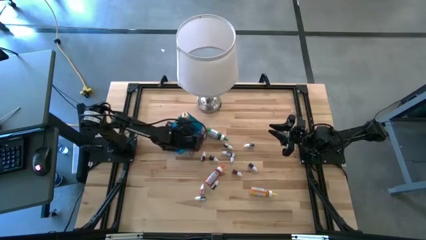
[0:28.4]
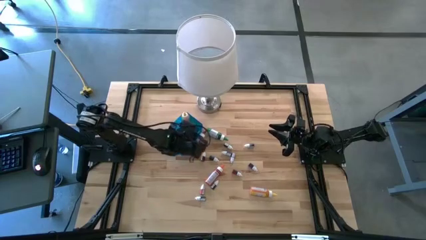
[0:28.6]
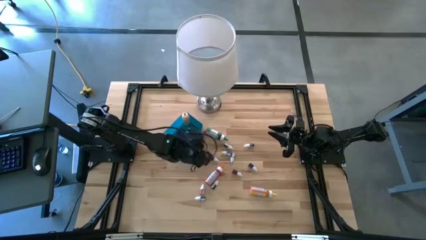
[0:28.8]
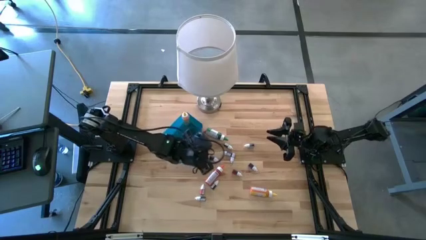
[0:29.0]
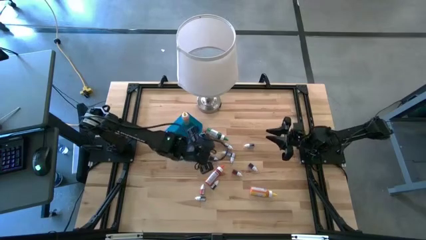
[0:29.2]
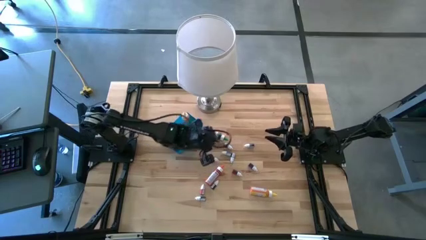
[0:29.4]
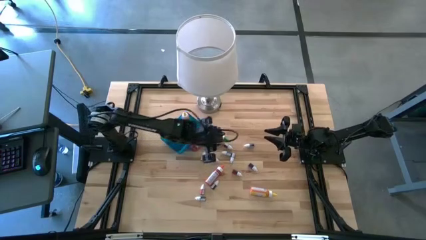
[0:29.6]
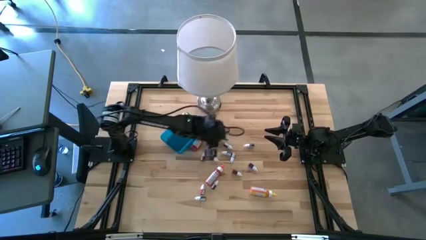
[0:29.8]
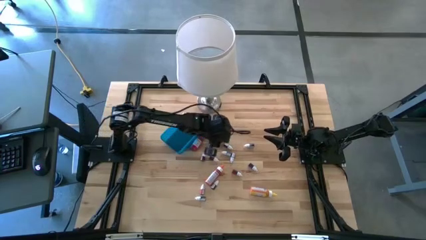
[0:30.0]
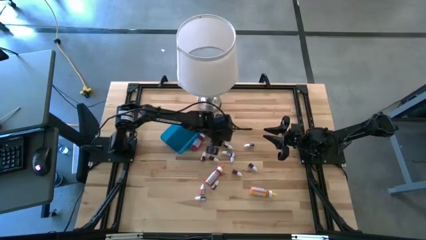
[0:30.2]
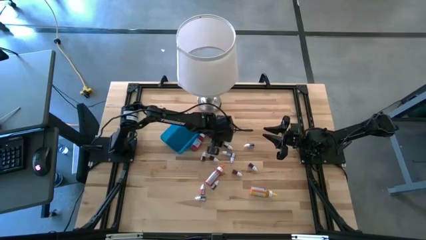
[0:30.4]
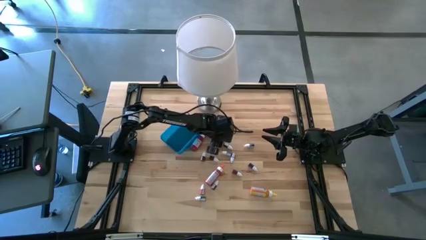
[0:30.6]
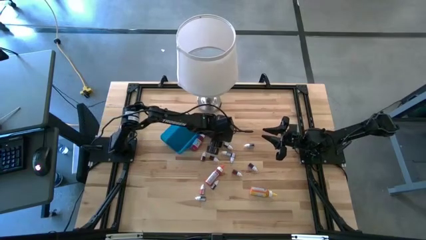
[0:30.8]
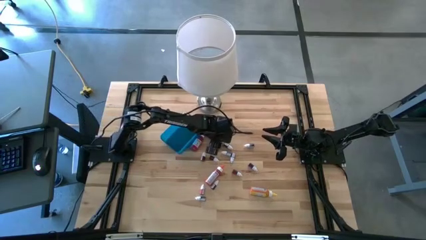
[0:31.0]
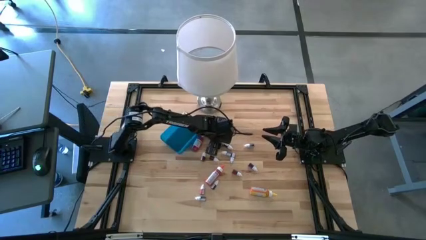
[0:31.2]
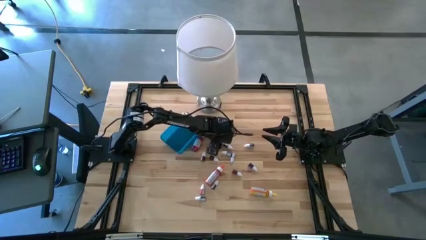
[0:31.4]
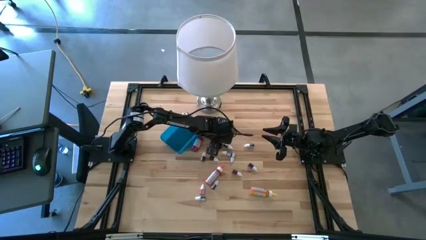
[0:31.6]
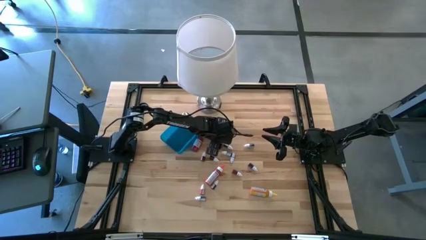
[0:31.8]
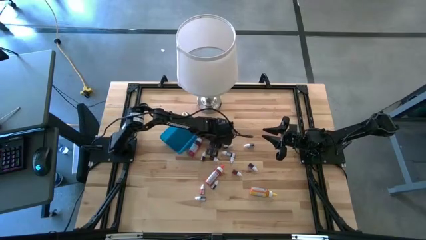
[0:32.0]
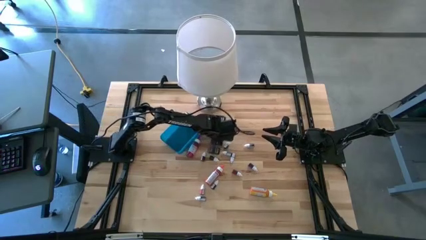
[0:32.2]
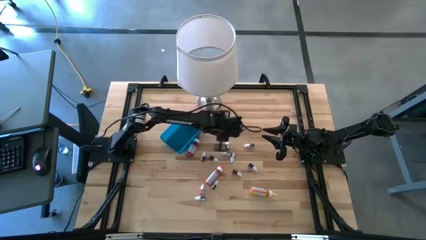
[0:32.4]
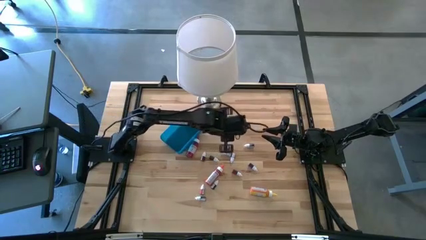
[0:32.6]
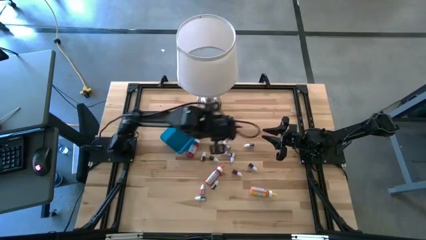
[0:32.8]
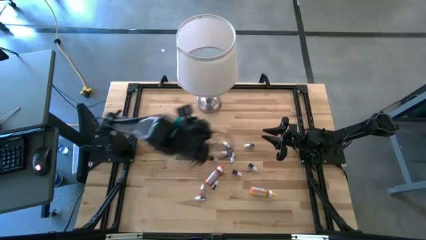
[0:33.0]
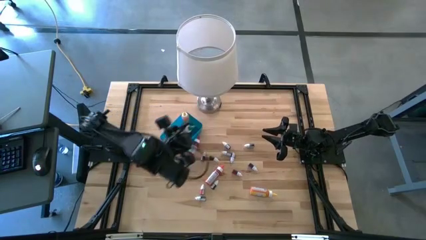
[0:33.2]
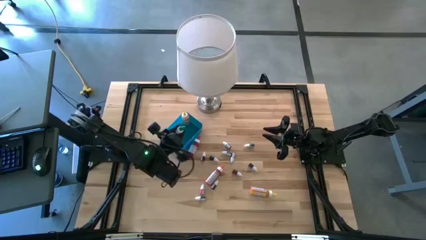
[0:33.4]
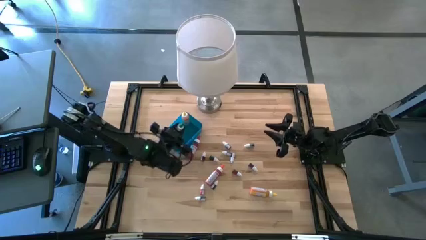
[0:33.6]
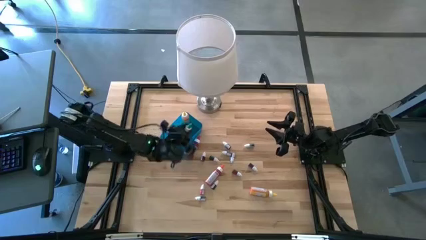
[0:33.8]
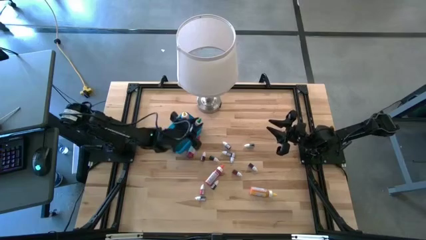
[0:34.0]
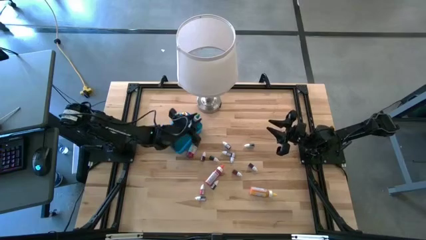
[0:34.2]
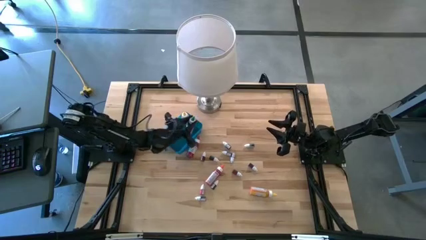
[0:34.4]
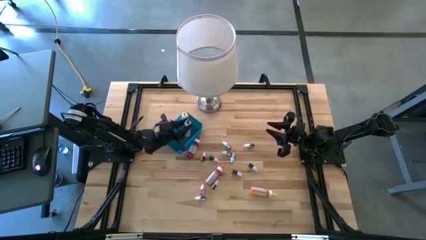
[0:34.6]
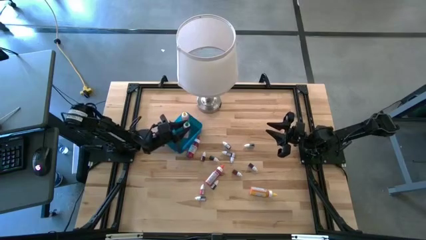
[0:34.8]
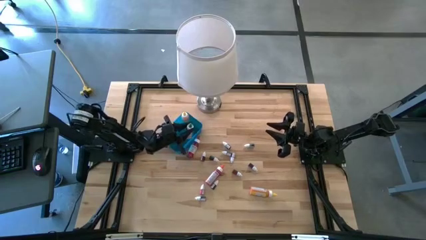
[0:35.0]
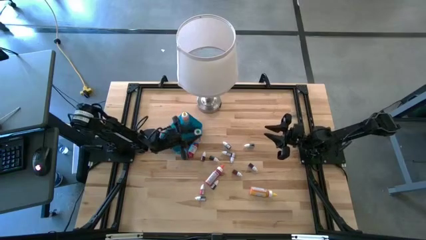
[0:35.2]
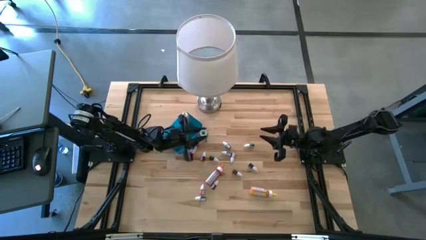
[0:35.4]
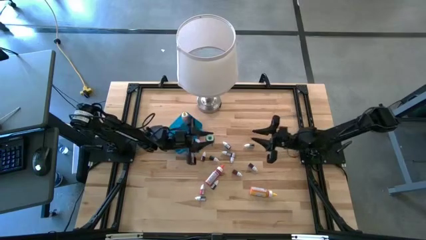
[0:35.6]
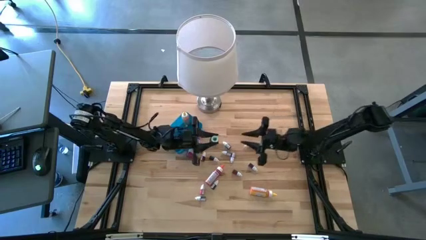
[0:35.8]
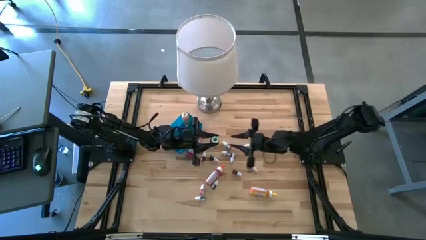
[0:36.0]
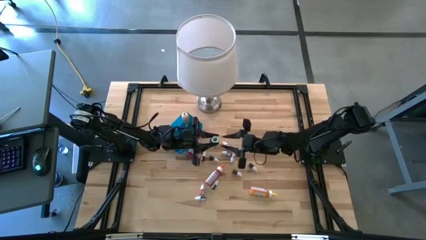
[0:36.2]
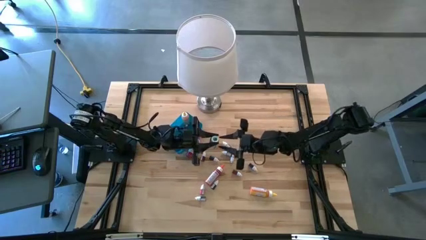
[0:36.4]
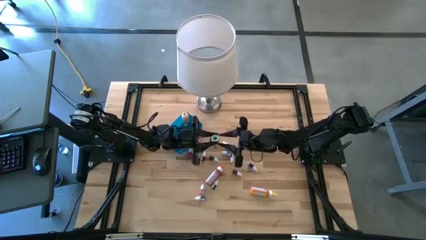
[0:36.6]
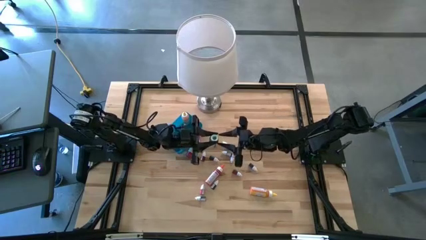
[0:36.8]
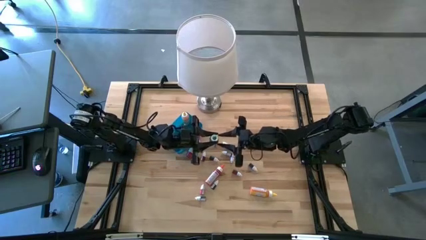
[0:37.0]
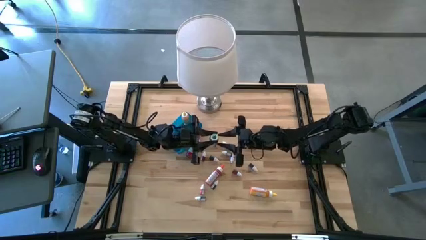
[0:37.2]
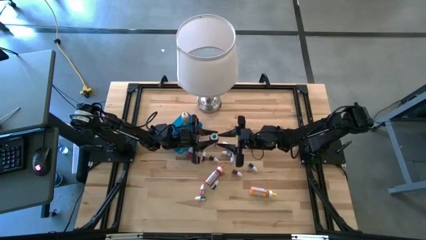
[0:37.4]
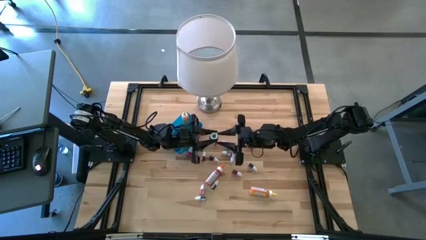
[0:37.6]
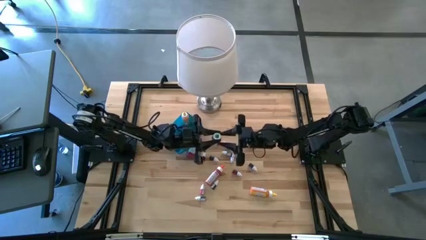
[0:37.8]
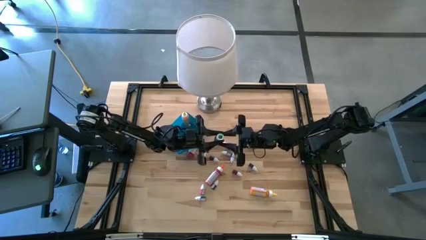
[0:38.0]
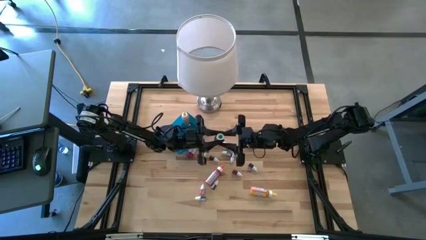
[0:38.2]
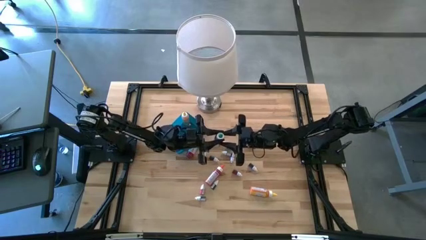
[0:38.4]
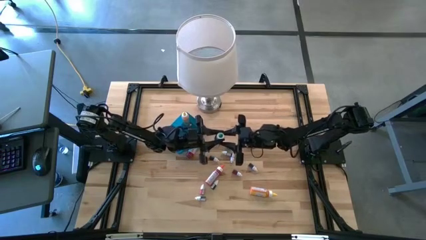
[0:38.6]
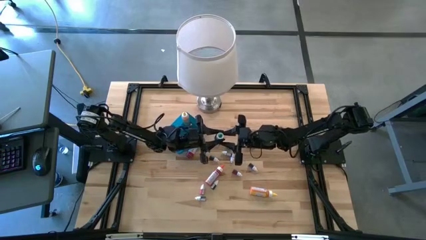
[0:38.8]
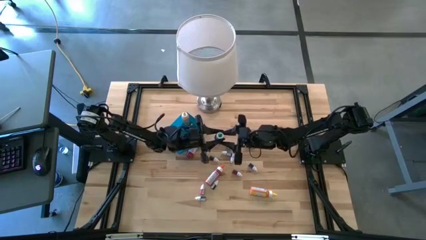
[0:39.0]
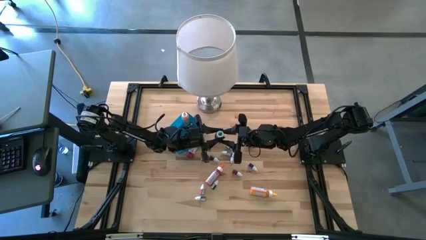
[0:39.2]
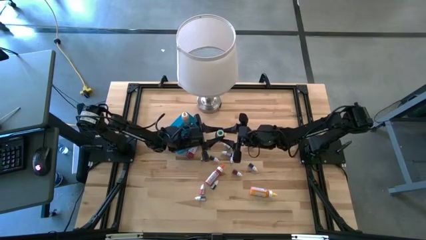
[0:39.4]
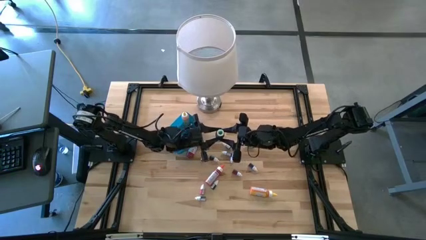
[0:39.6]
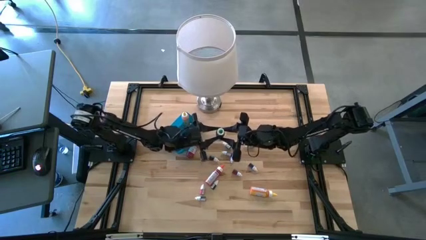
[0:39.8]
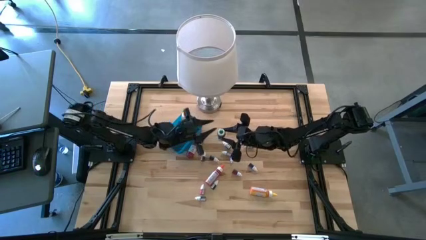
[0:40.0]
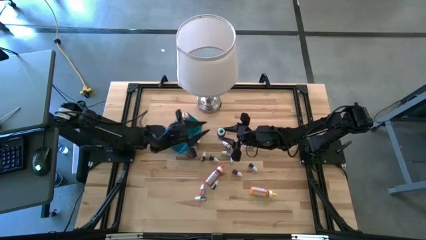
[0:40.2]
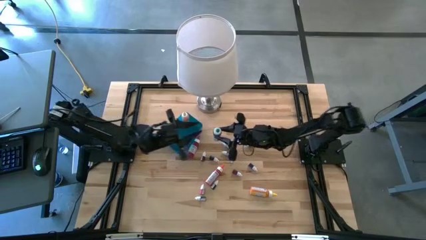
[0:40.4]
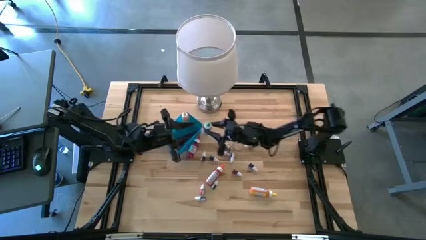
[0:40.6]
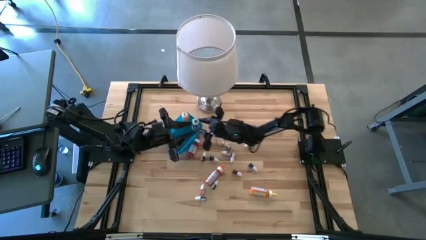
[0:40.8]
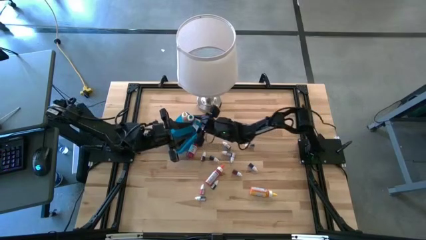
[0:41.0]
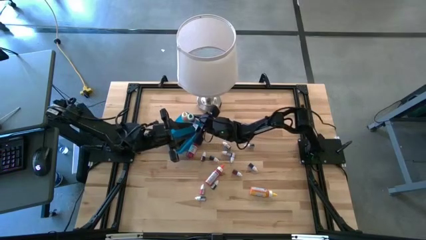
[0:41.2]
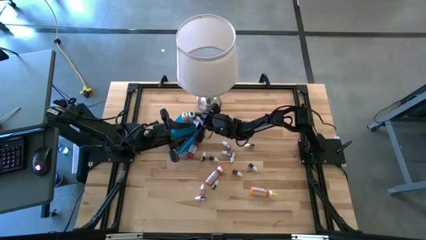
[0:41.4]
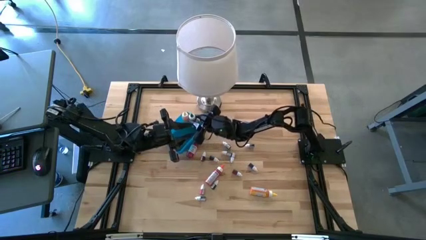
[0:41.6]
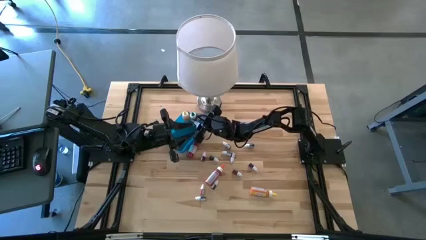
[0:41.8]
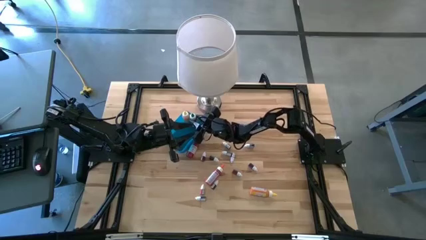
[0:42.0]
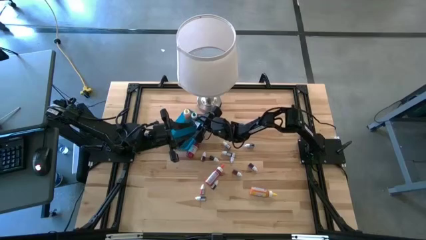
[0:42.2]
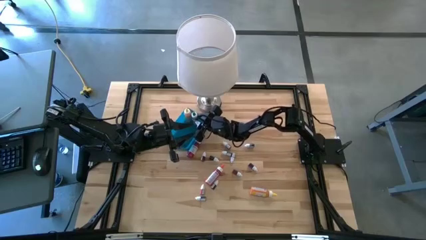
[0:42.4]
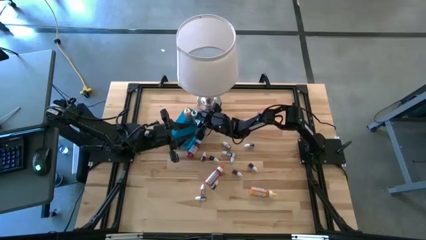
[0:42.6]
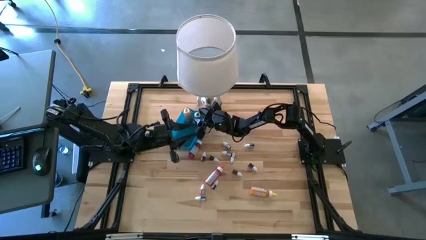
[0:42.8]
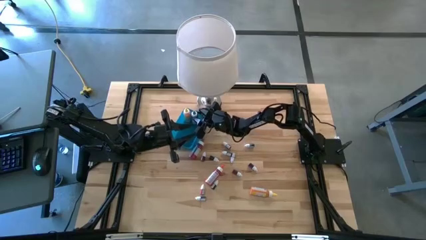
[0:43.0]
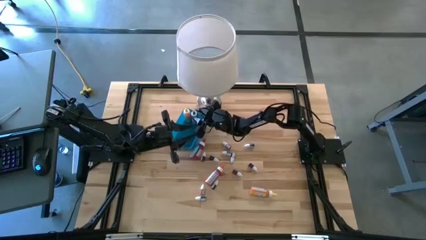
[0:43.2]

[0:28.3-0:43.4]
Task: Pick & Place food coloring
Put the large green food coloring bottle into the blue bin
